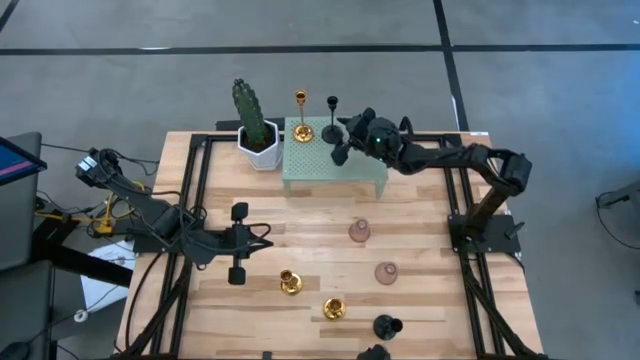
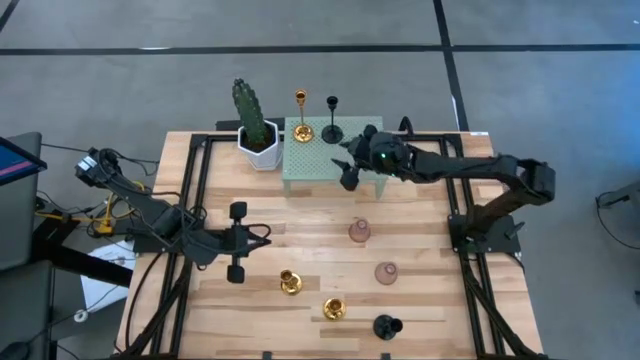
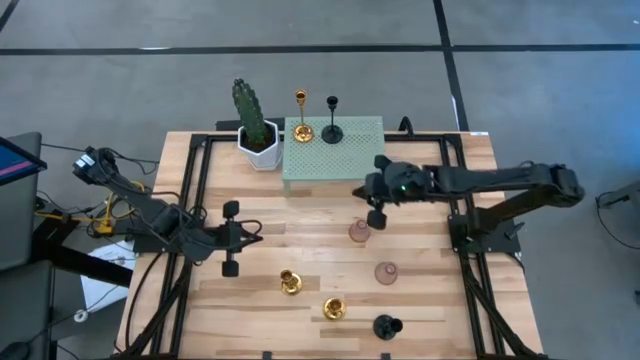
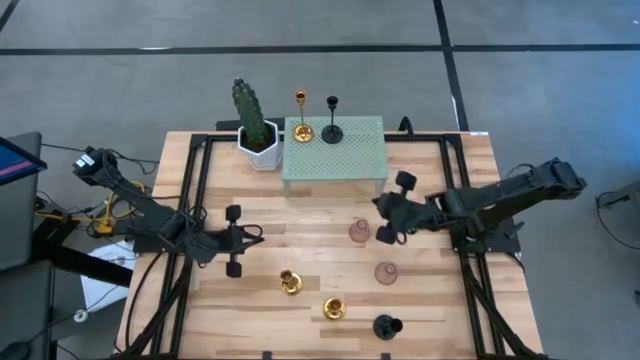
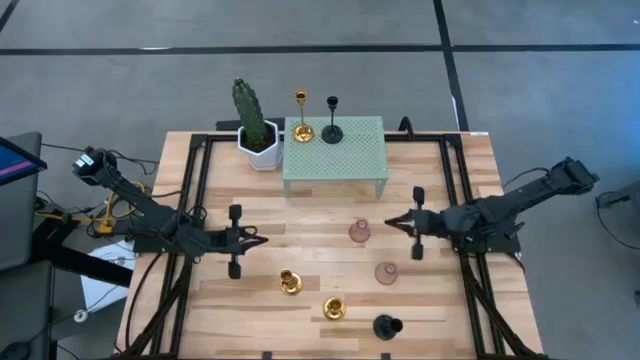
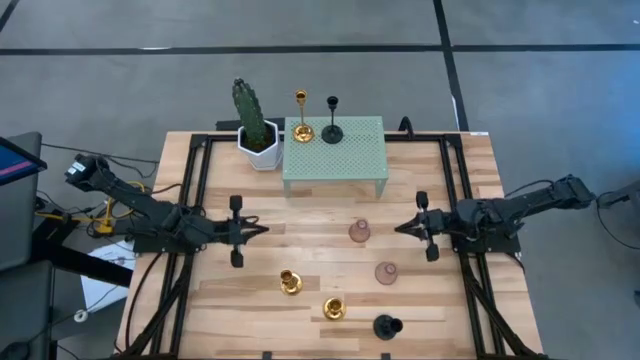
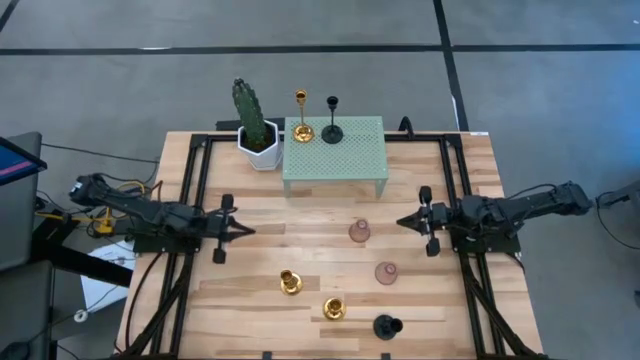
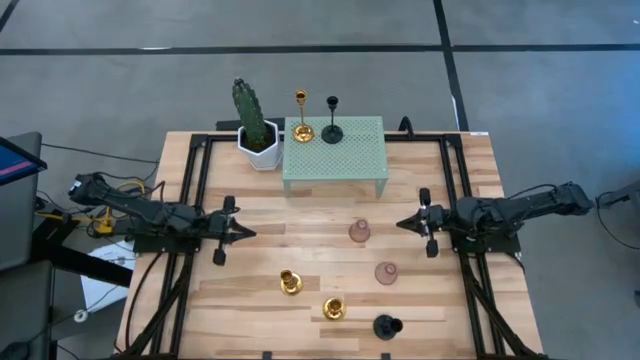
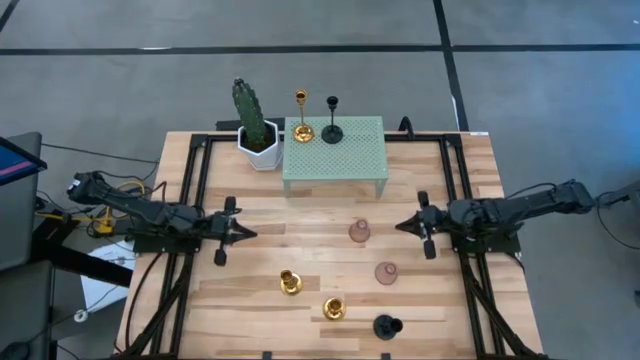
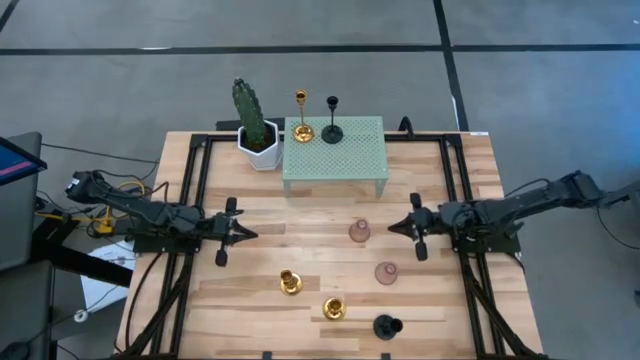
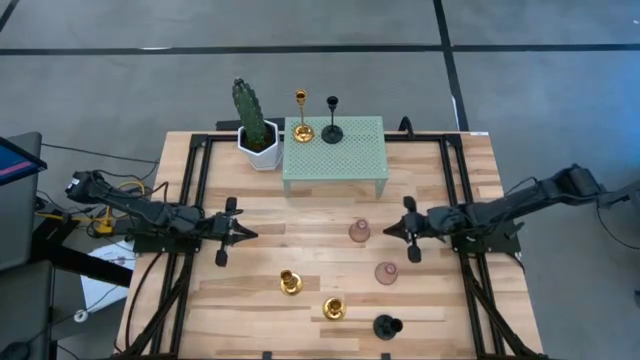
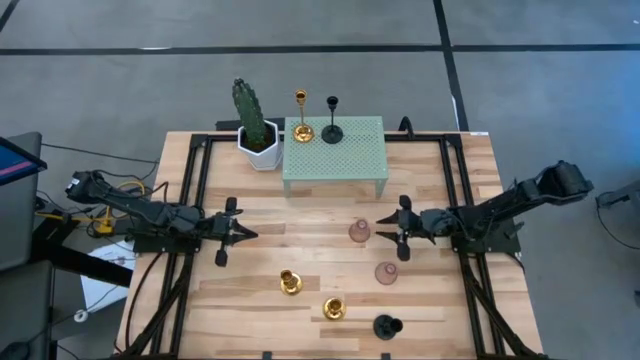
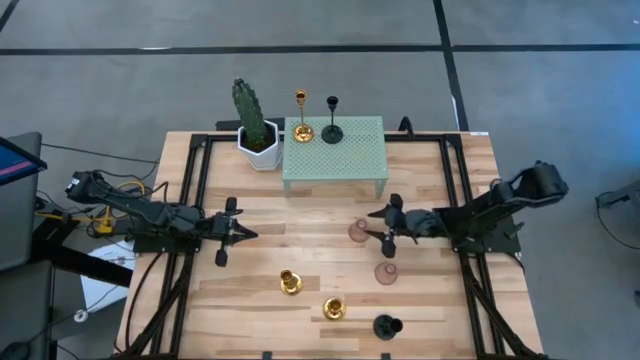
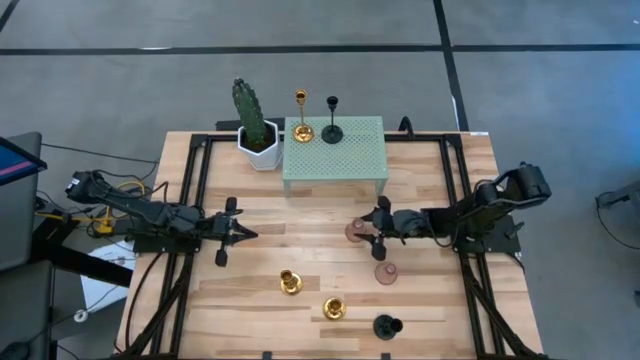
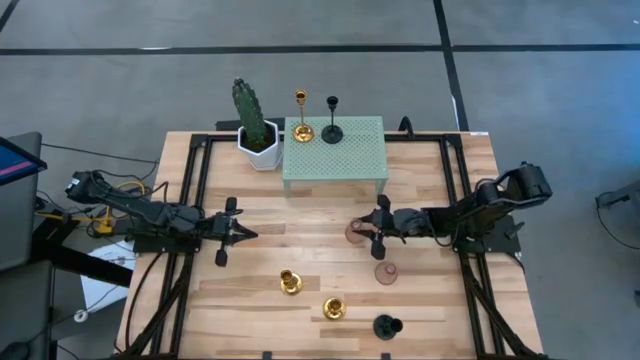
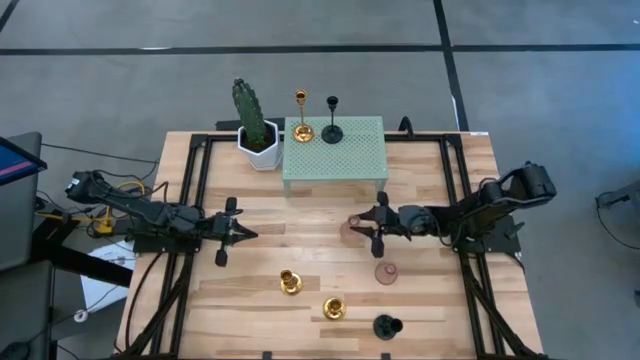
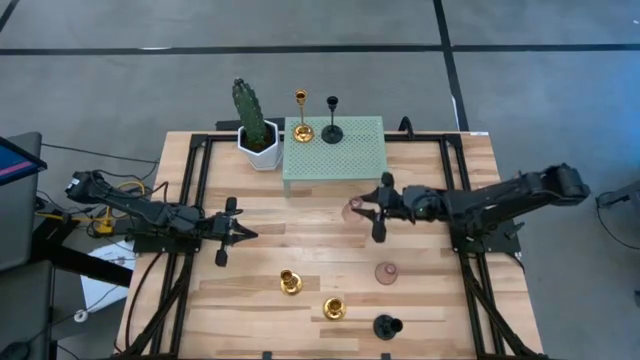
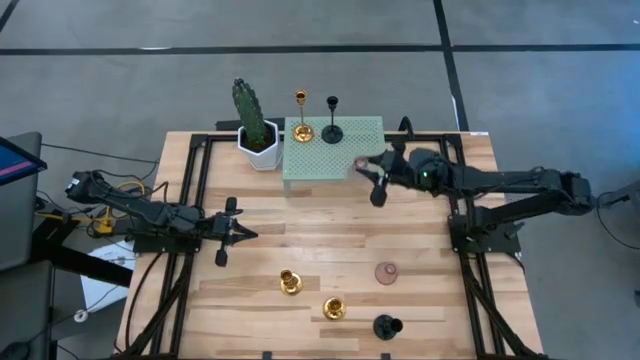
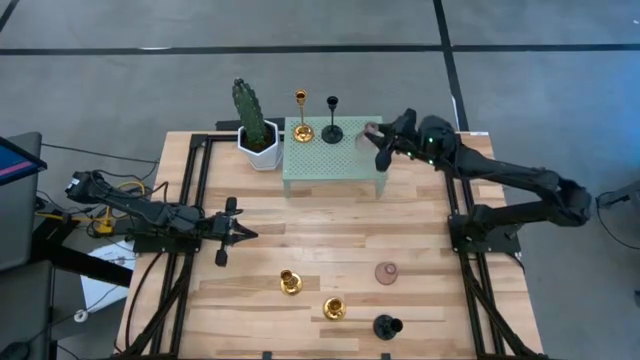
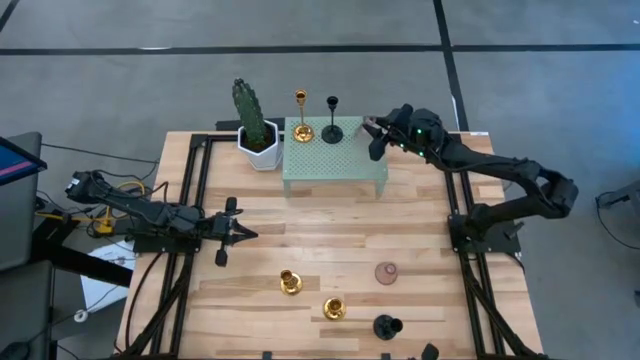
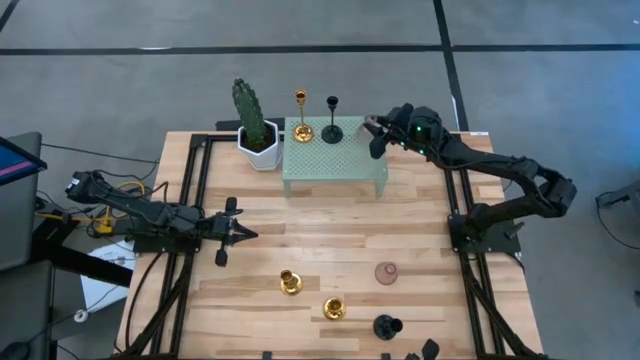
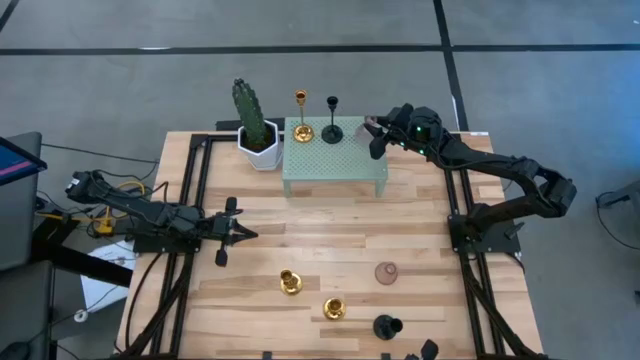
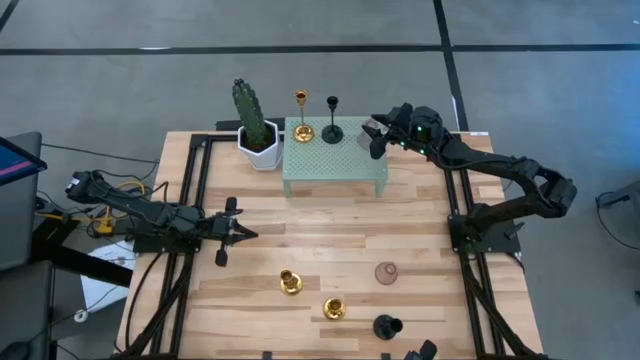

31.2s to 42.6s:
Task: Pick & Place candle stick holders
Put the top pink glass candle holder on the shelf

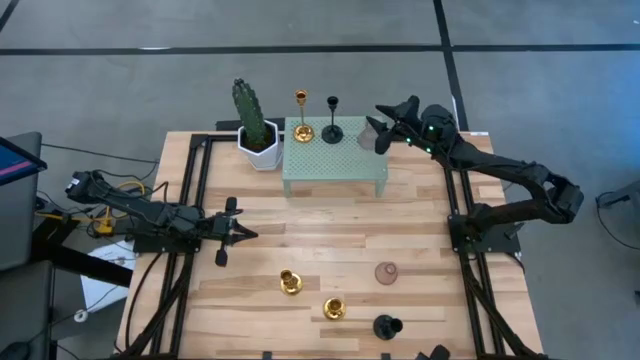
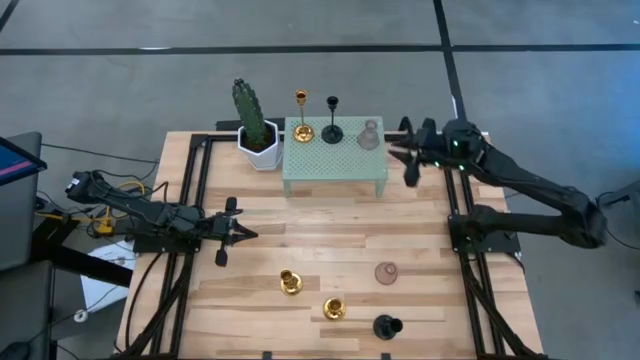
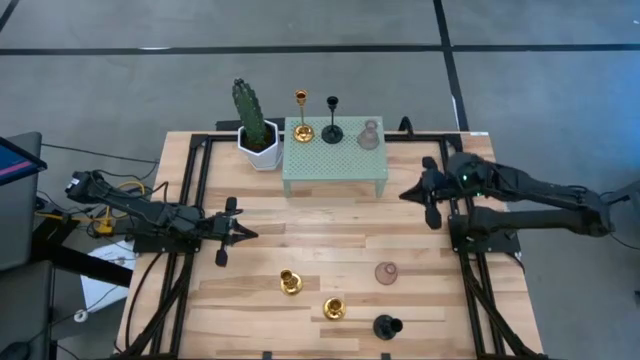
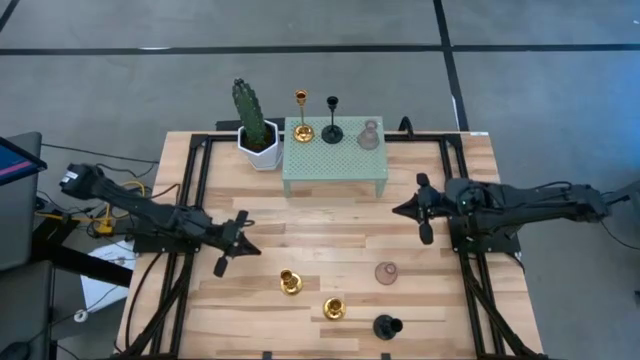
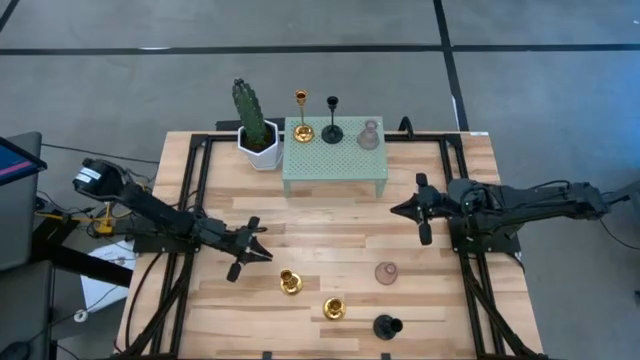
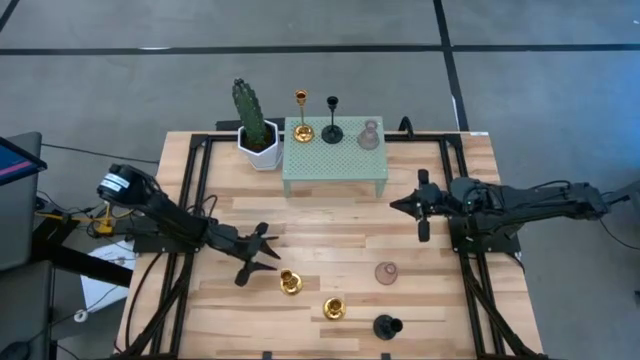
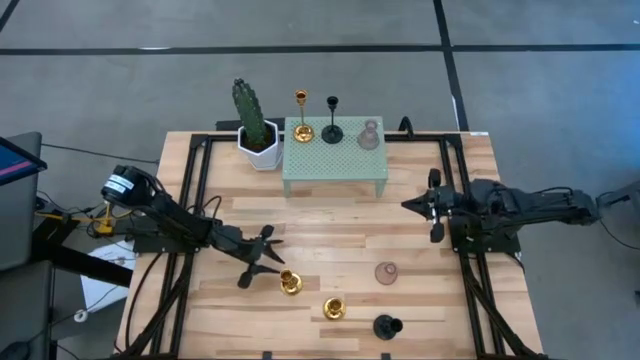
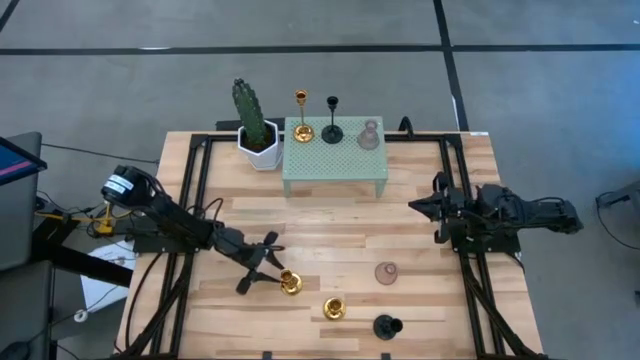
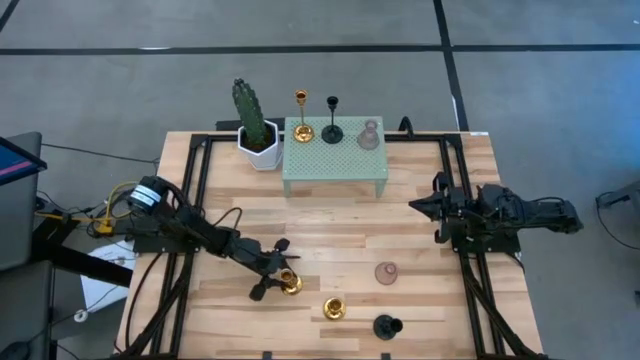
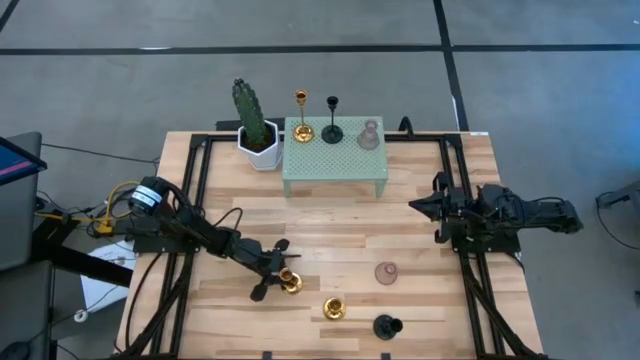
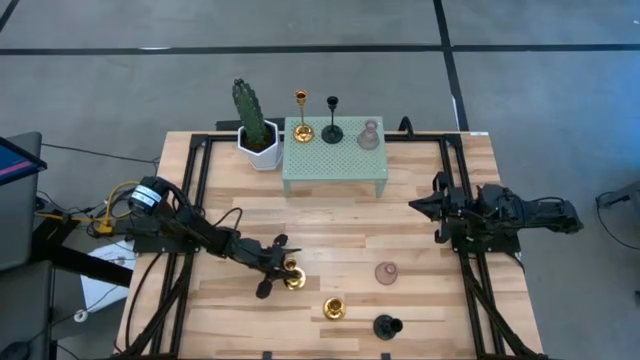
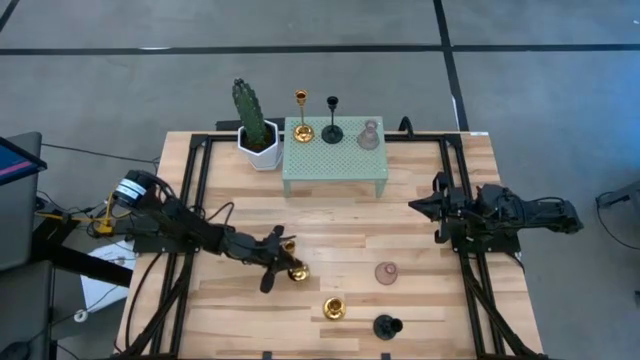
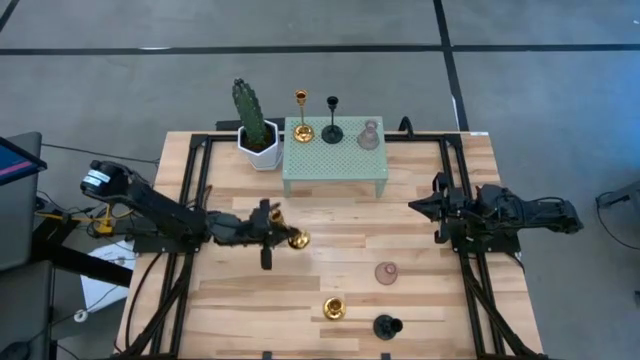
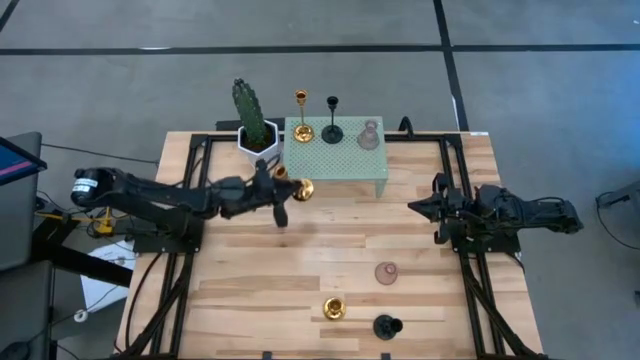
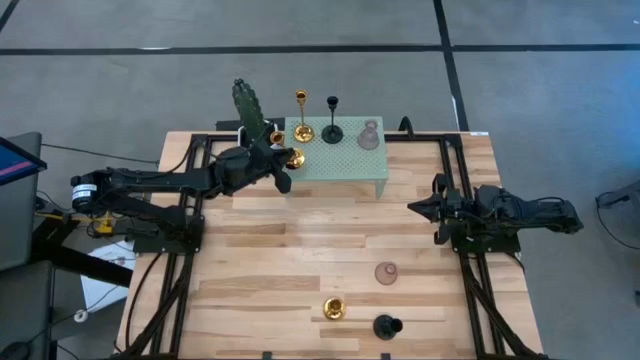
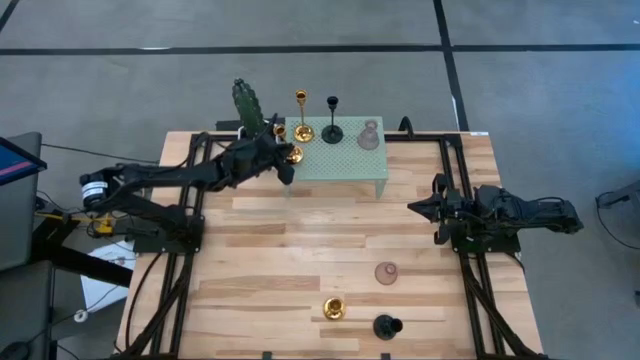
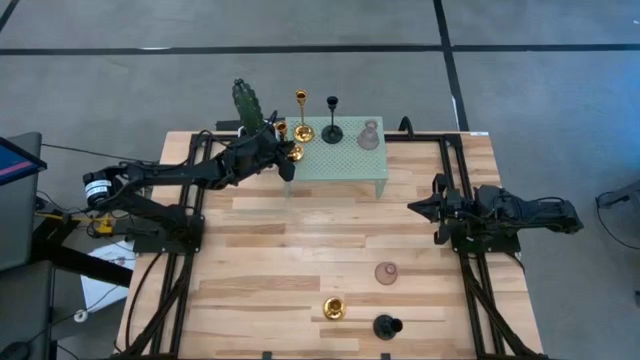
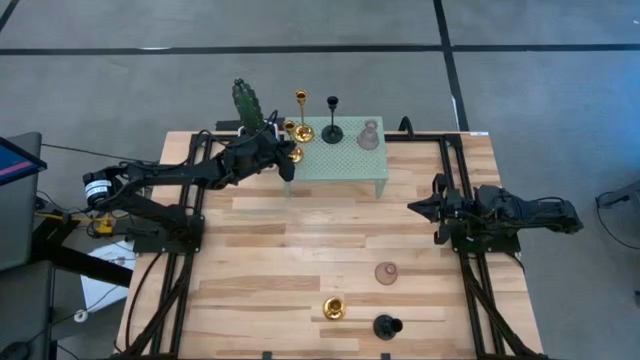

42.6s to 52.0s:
Put the left gold candle holder on the shelf
